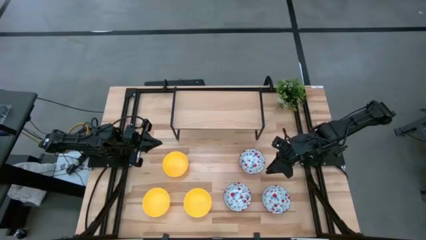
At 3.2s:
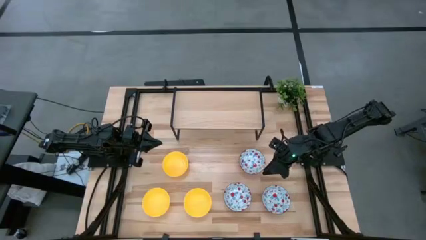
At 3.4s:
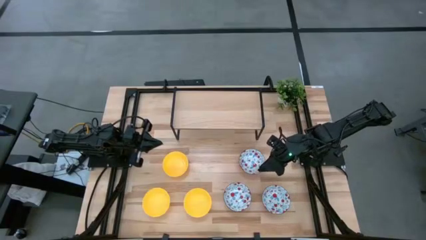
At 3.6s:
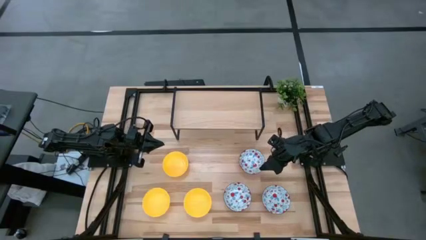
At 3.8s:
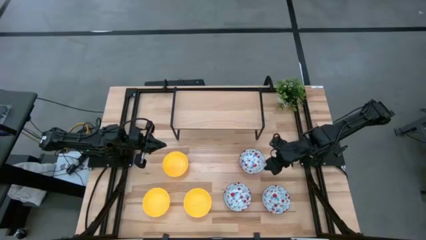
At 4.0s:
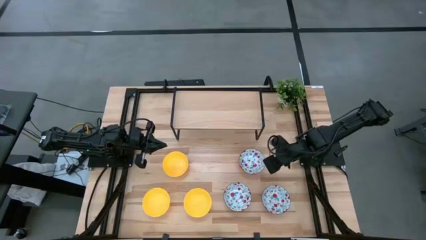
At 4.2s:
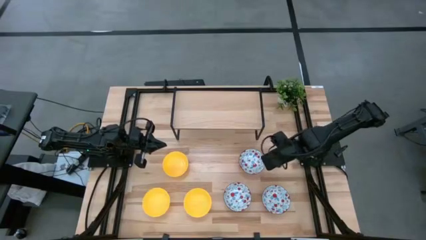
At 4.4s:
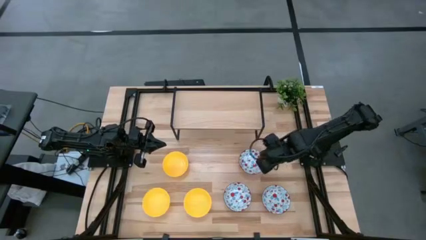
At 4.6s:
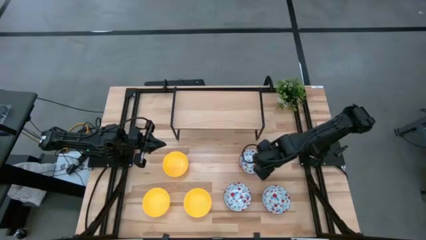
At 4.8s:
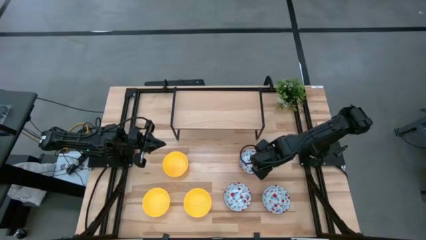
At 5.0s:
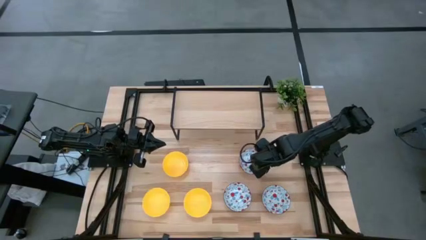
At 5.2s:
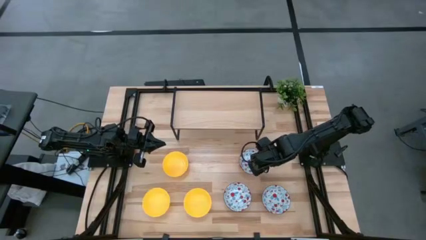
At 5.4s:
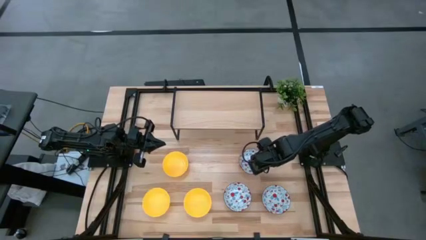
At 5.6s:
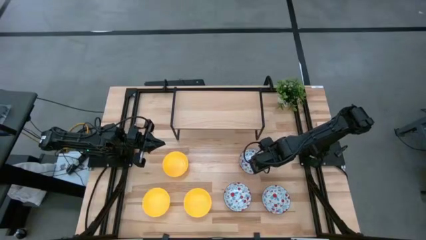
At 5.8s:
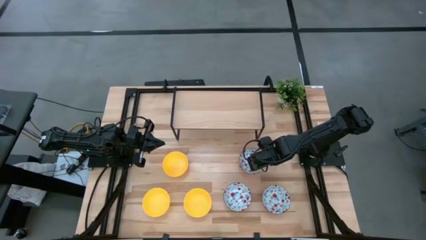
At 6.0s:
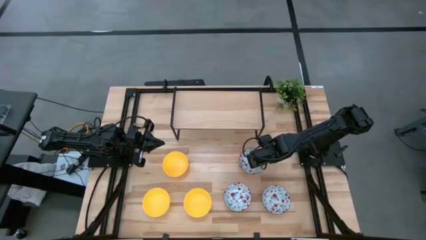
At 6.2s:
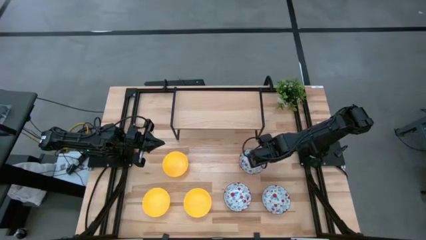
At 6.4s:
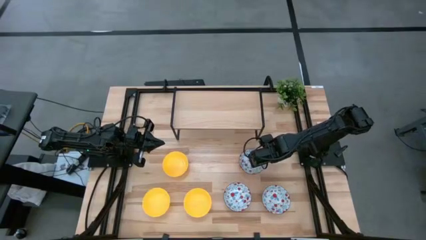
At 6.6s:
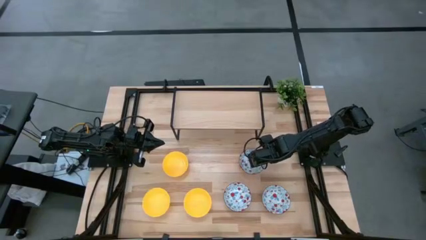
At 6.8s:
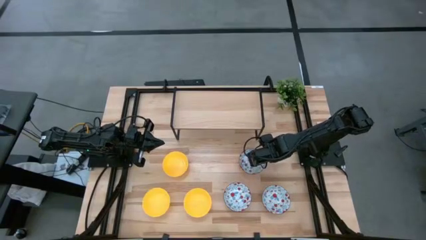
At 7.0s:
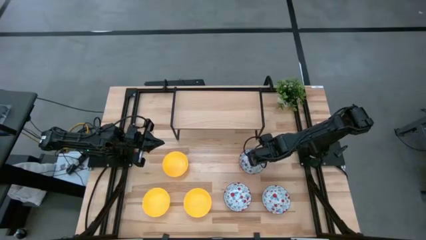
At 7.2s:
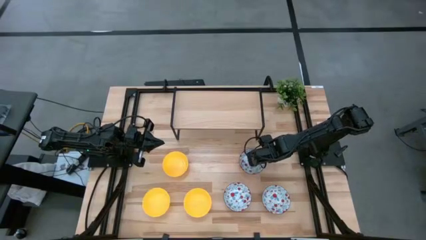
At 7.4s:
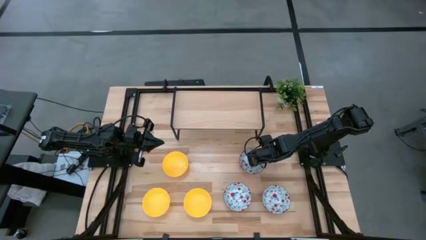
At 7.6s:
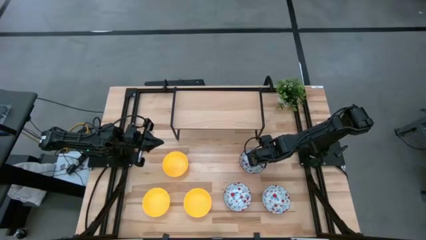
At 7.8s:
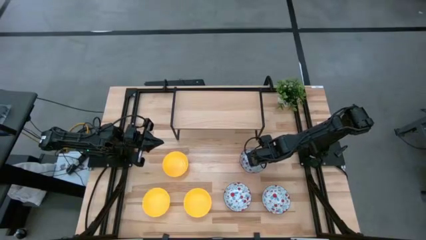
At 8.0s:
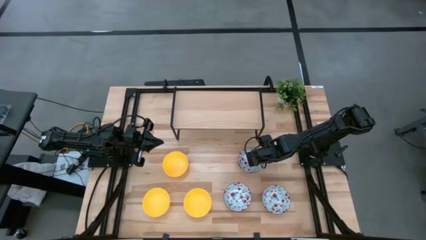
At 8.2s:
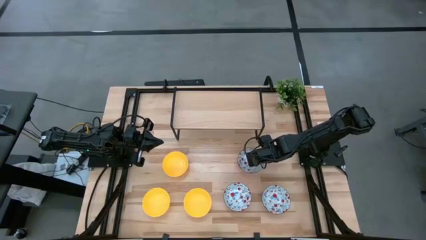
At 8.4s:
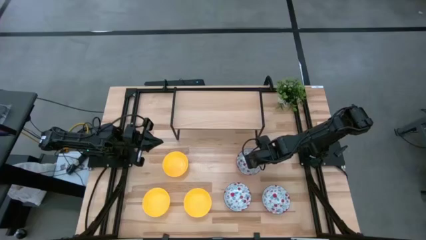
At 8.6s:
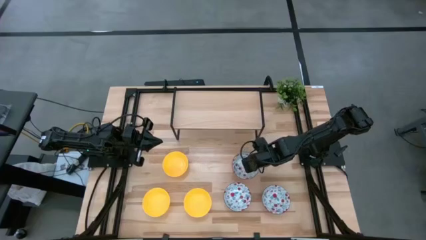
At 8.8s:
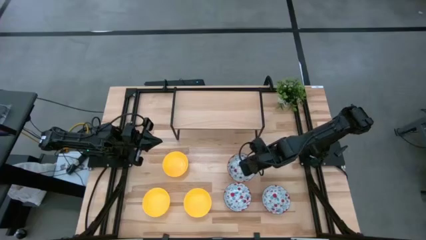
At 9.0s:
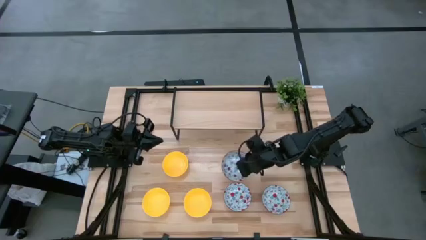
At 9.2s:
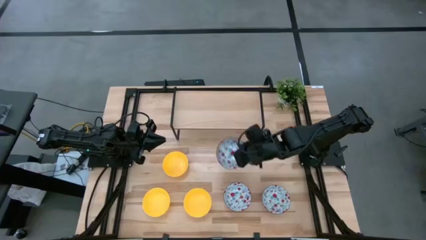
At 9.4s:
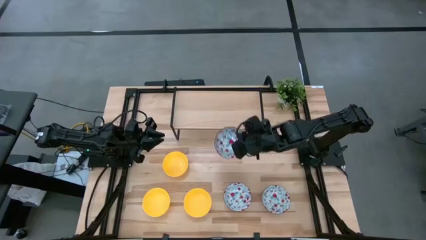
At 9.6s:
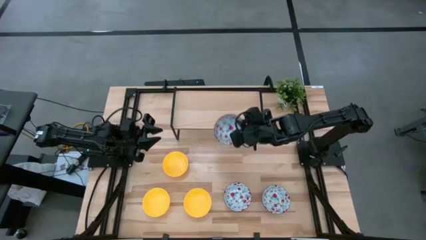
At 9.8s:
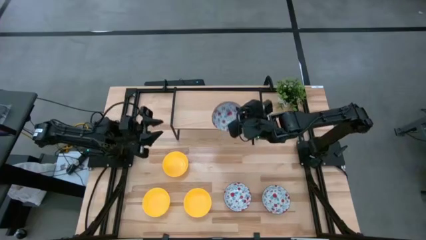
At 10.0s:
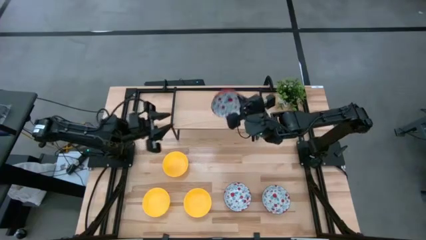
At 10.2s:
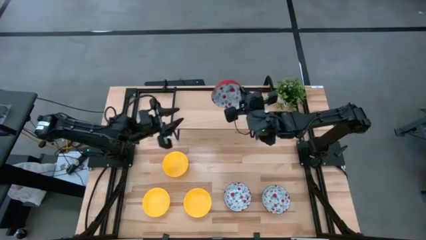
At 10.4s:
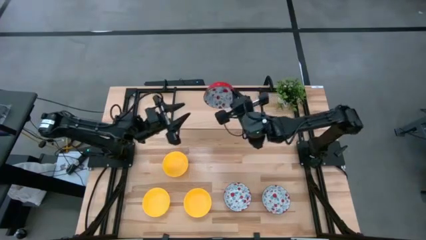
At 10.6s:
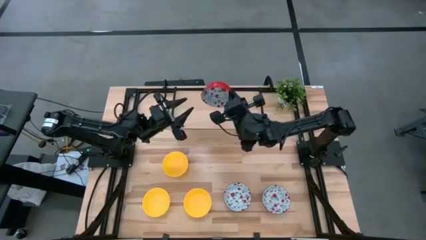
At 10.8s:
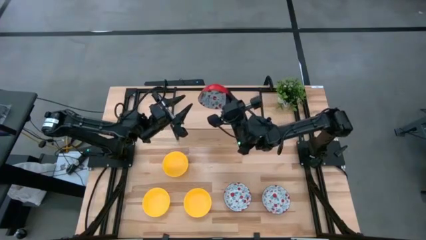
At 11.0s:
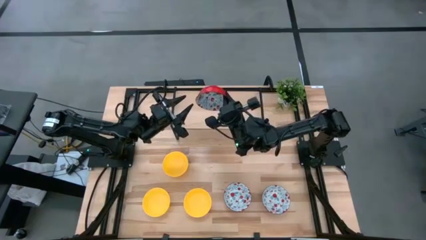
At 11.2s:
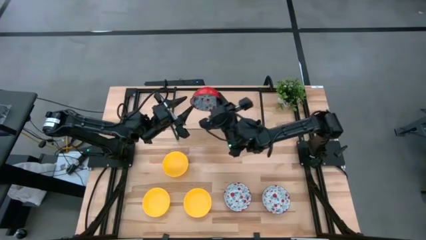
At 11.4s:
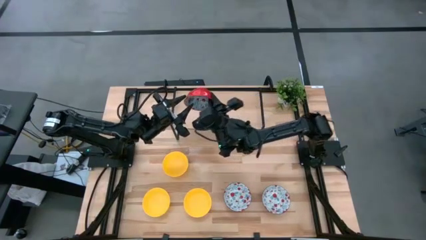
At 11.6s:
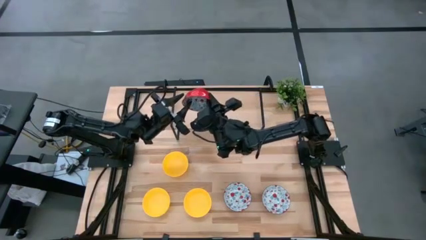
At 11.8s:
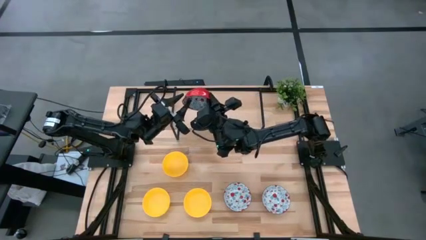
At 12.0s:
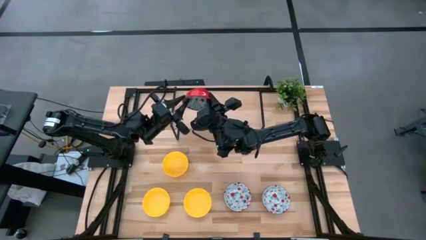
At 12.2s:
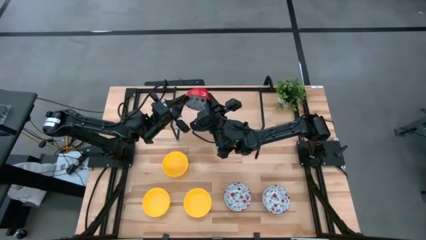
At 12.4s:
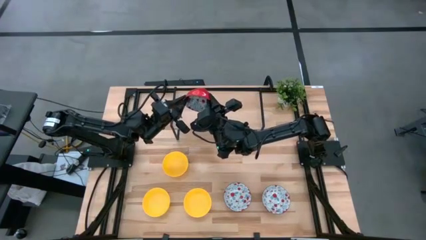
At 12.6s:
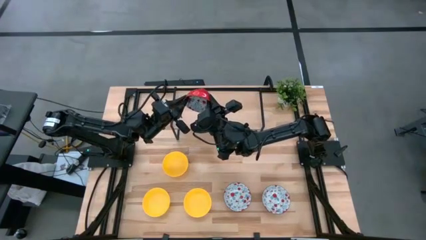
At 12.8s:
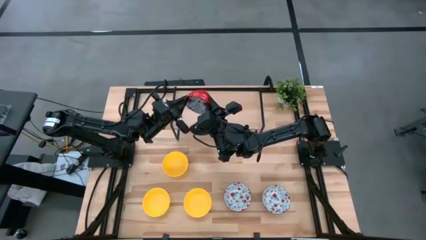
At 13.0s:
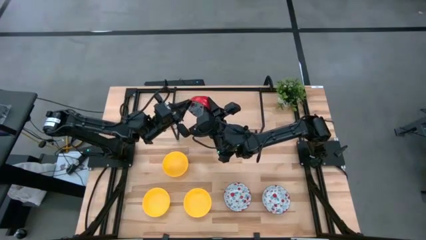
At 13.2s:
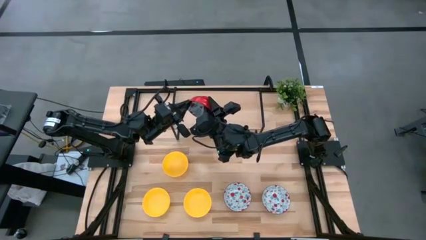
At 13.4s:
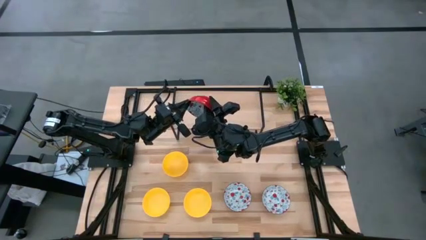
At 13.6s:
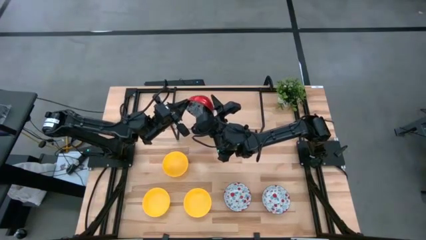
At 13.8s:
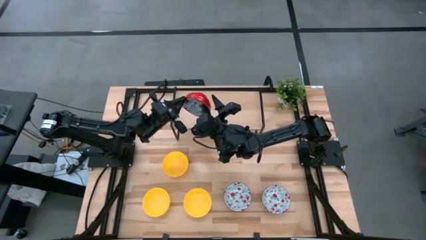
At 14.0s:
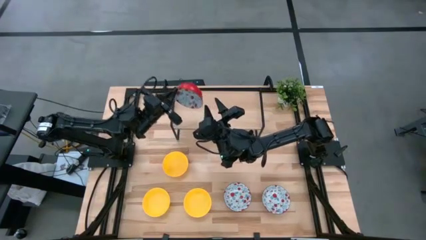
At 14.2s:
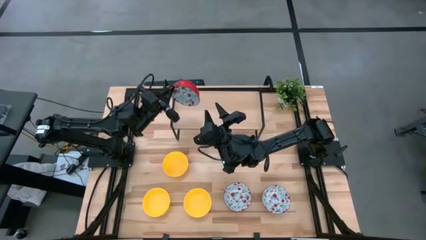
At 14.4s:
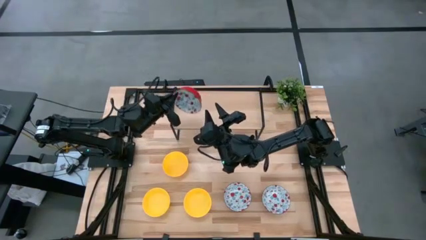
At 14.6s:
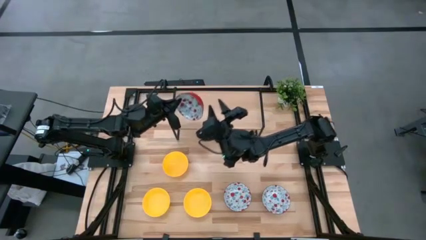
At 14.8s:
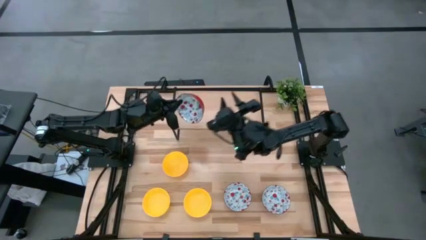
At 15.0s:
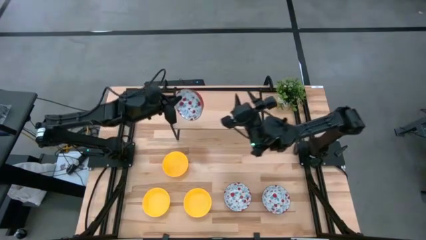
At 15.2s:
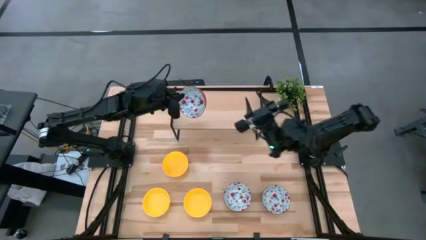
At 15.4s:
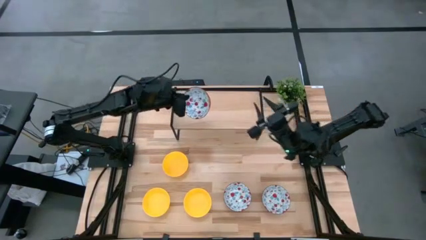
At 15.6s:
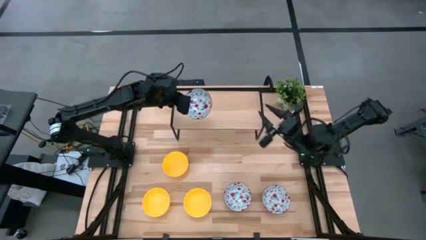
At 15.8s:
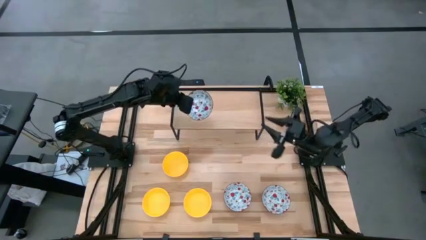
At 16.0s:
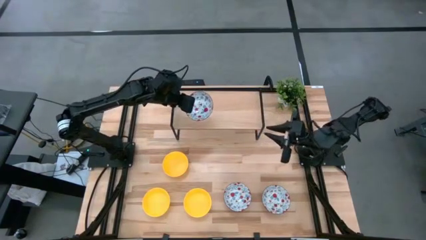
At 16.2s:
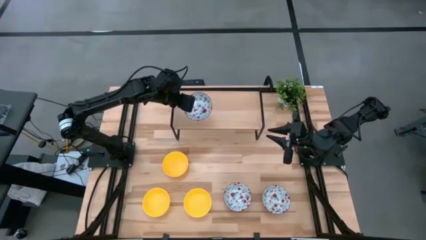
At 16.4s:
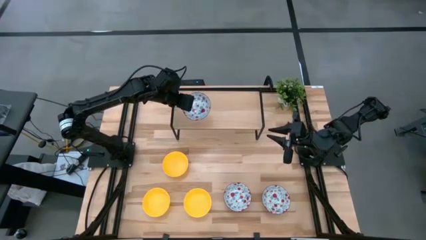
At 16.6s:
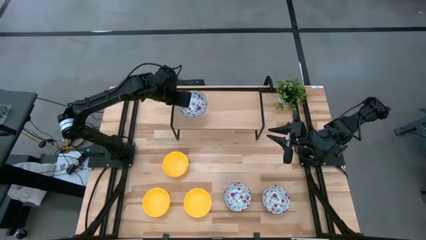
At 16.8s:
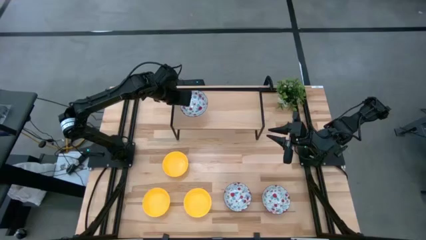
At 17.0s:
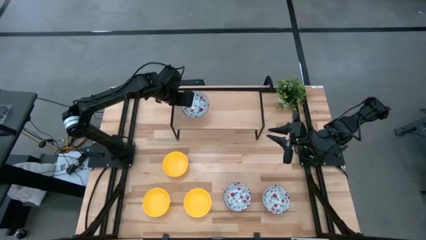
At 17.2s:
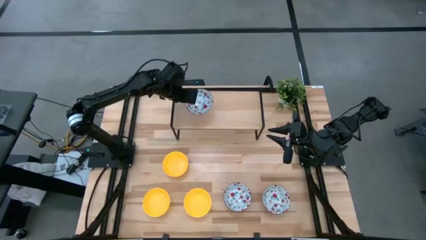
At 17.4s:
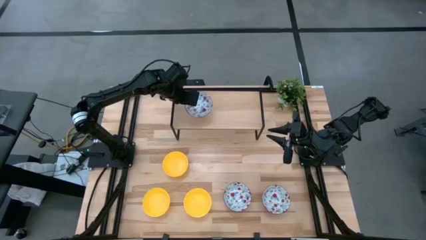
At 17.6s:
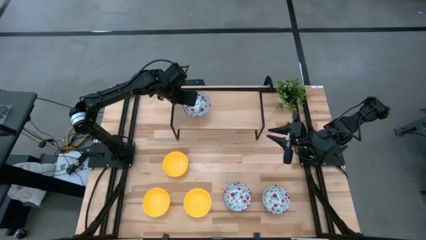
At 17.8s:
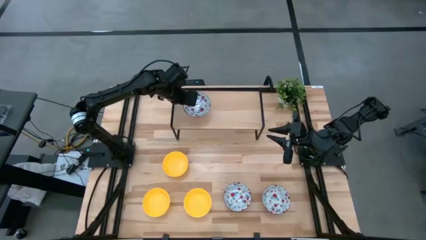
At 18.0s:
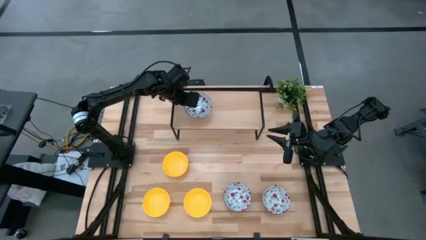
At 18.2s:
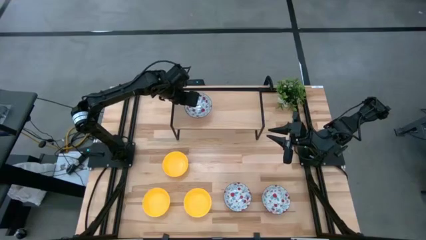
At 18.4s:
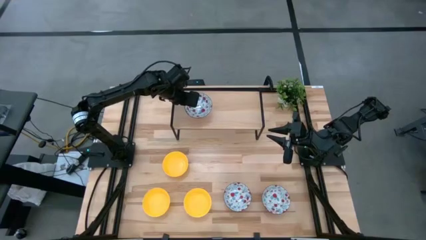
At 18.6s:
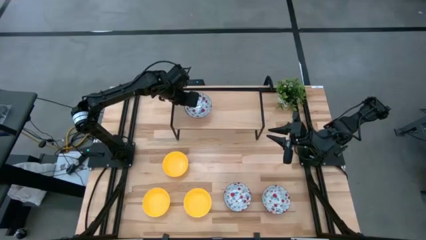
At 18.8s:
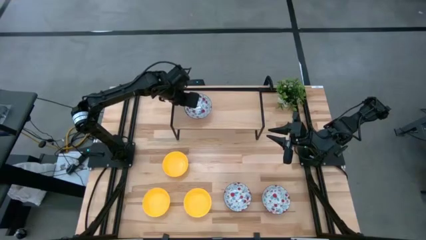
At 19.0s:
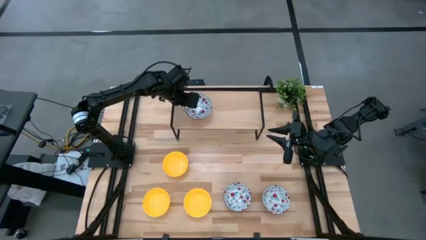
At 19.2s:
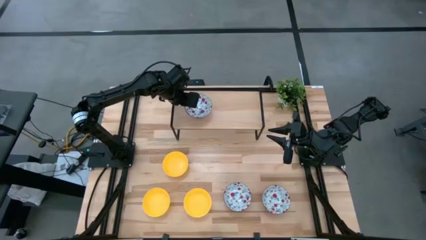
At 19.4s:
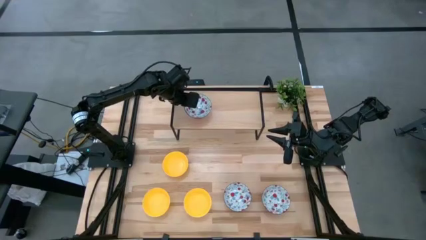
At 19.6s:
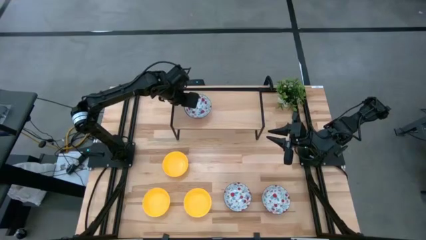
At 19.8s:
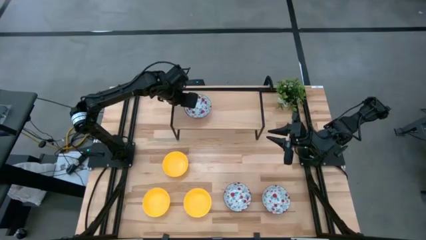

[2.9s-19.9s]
Task: Pick & Place Mini bowls
Put the top white patterned bowl on the shelf
